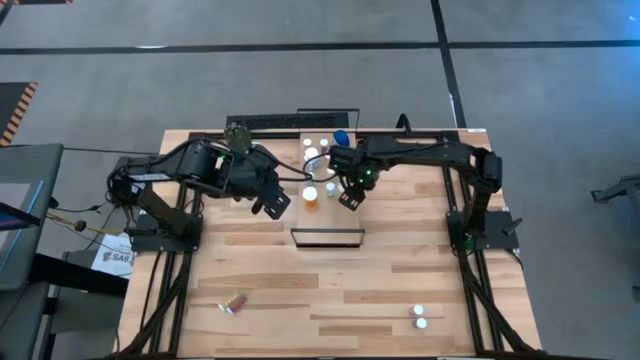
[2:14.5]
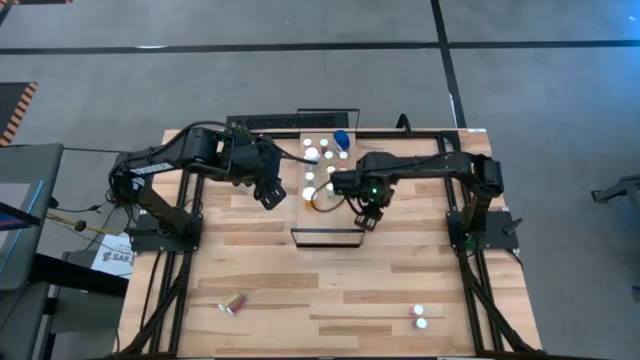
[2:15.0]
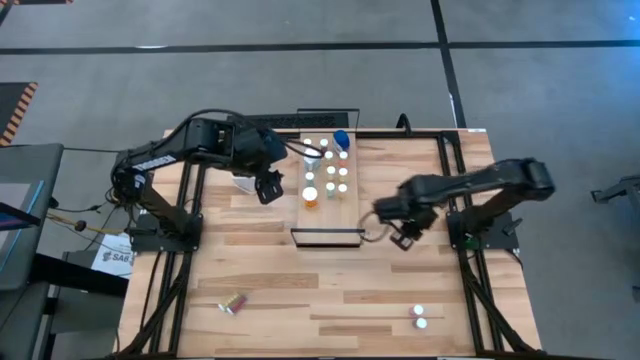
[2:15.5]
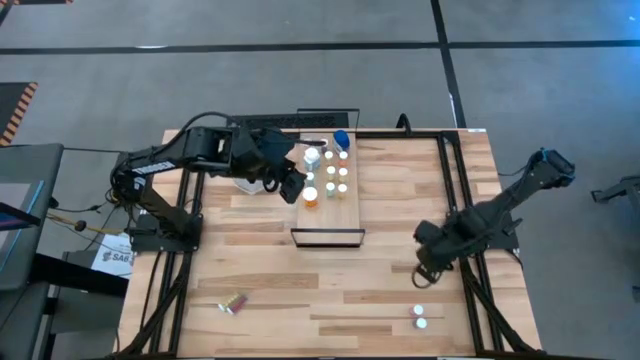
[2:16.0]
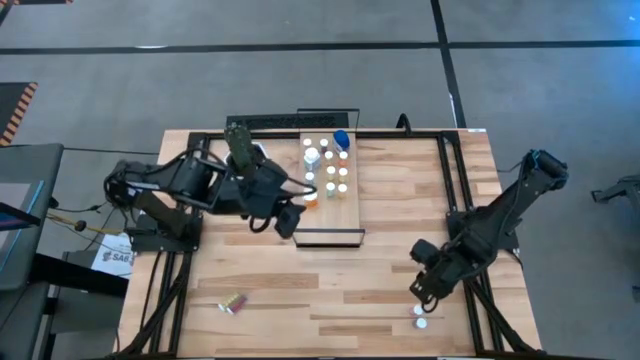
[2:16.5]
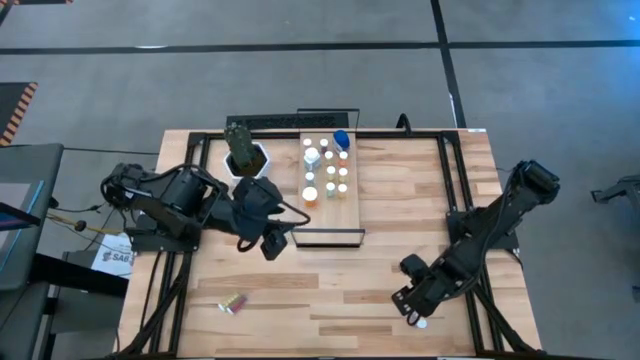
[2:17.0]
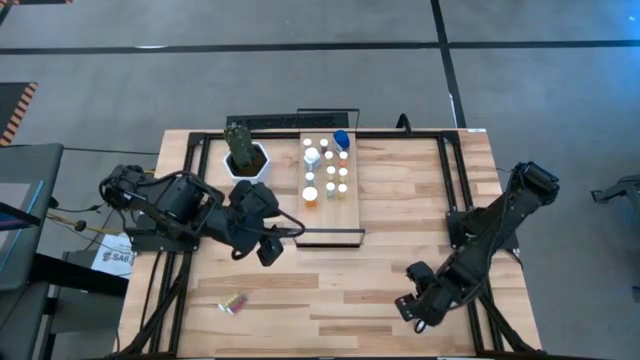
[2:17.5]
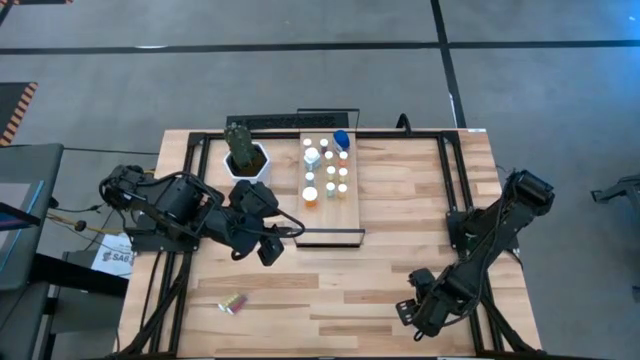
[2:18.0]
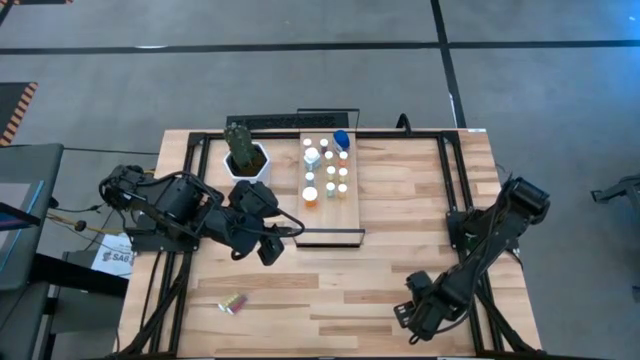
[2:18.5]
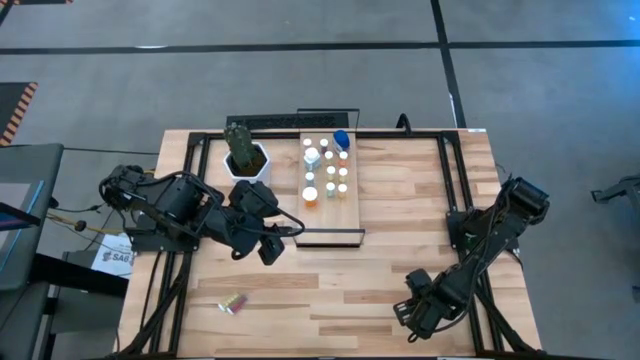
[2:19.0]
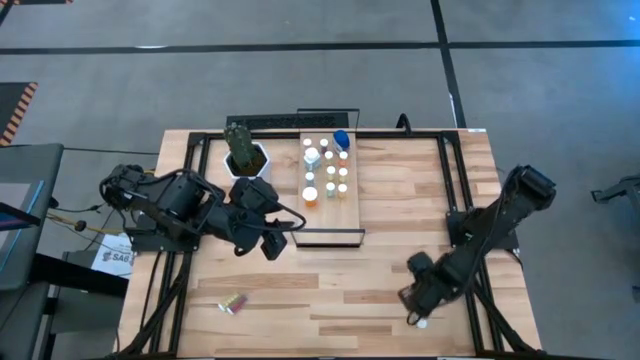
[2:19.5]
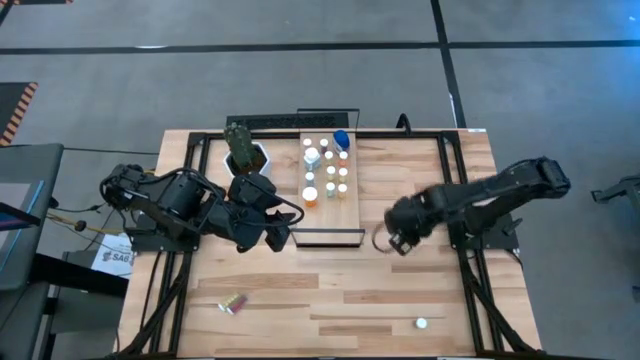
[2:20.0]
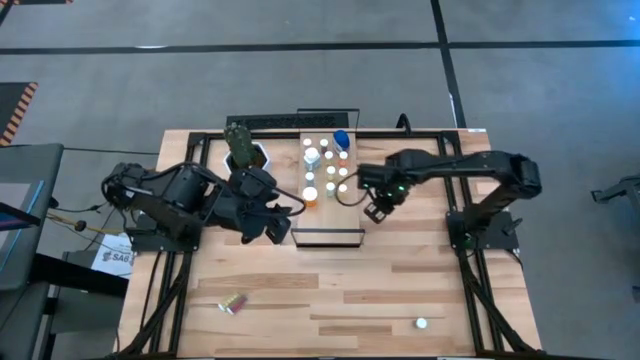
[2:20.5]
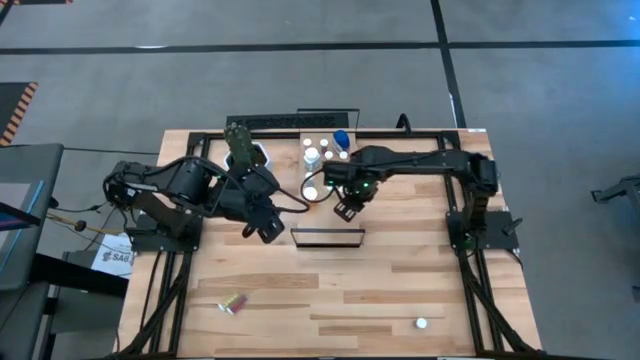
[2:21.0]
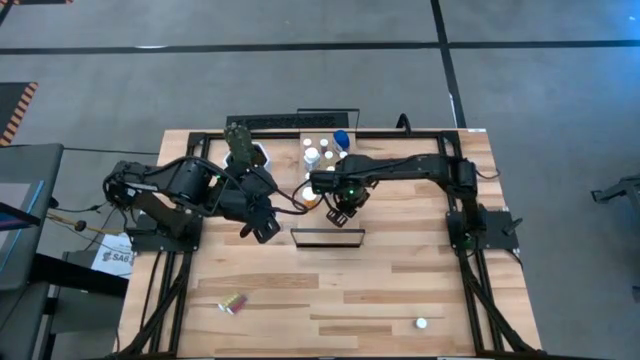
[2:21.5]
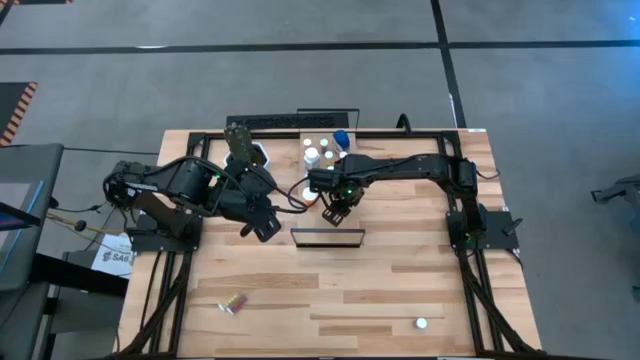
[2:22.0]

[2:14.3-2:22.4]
Task: Pick and place medicine bottles onto shelf by color
Put the pink pill bottle on the shelf

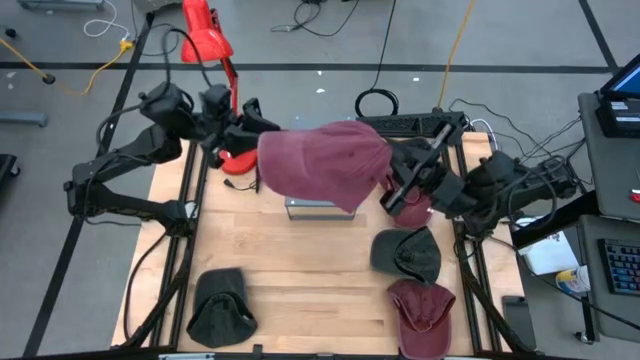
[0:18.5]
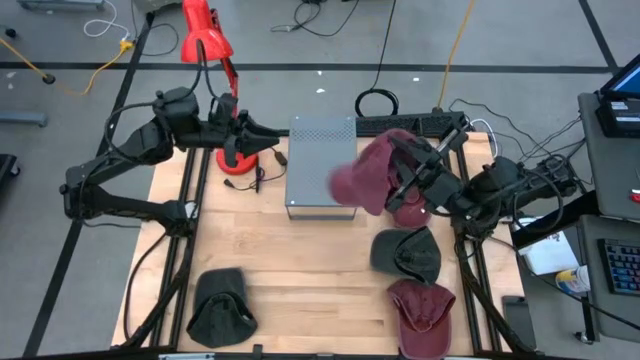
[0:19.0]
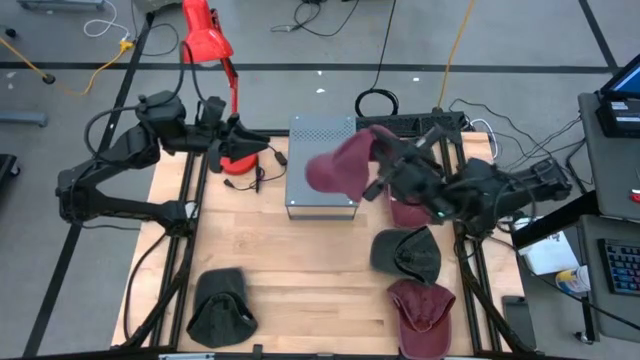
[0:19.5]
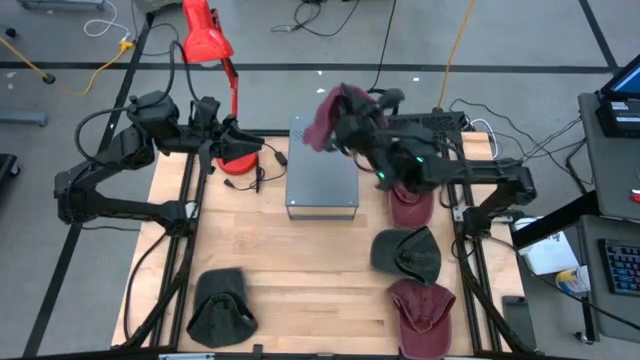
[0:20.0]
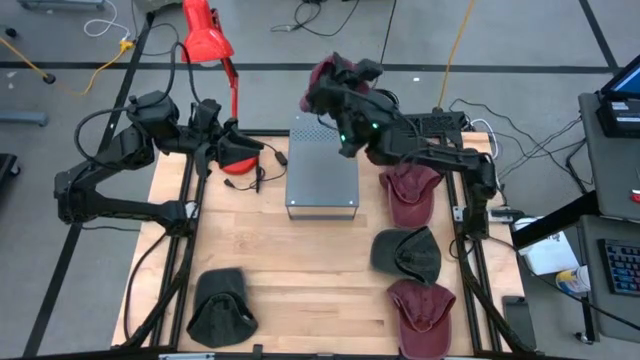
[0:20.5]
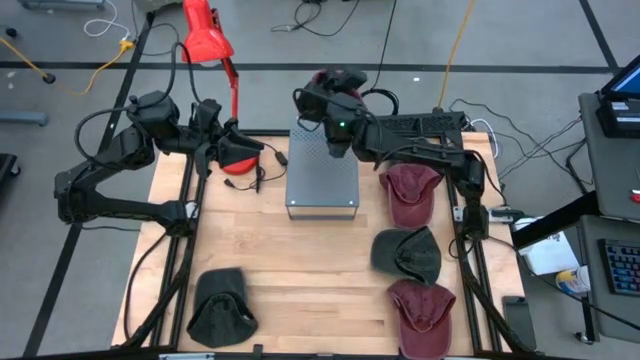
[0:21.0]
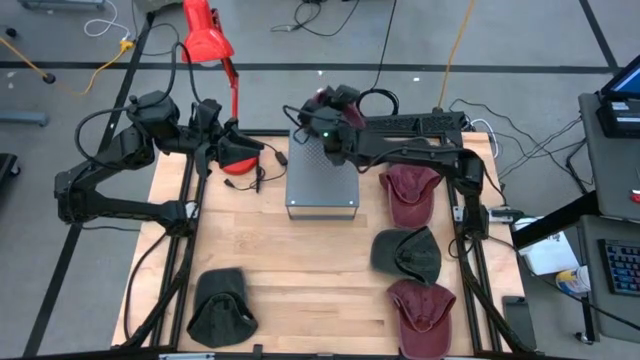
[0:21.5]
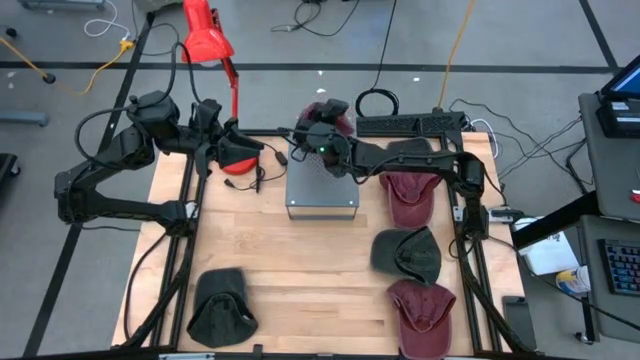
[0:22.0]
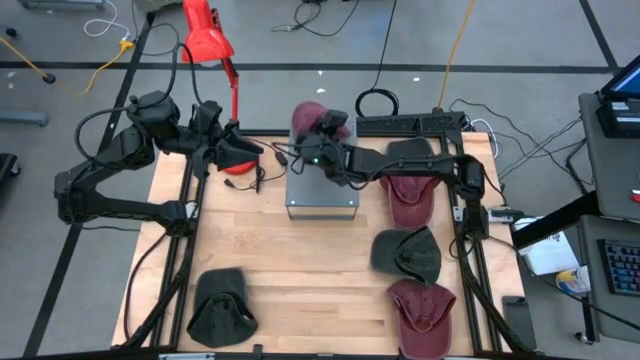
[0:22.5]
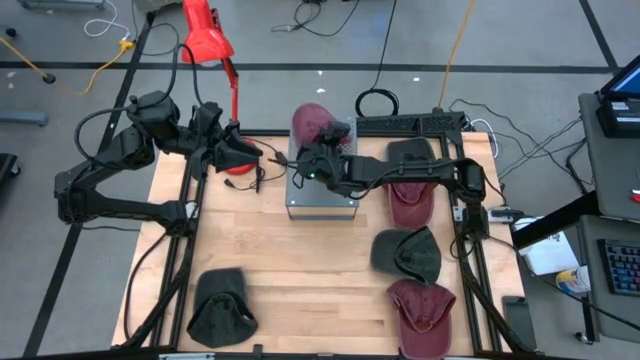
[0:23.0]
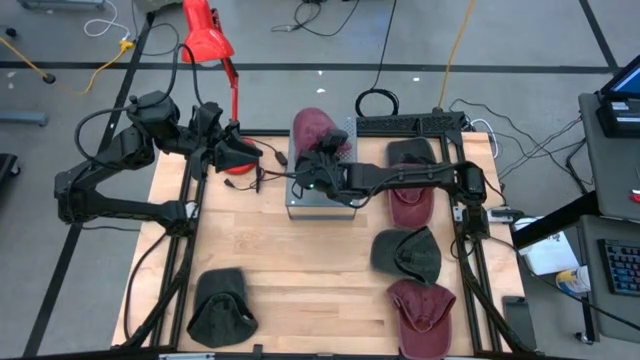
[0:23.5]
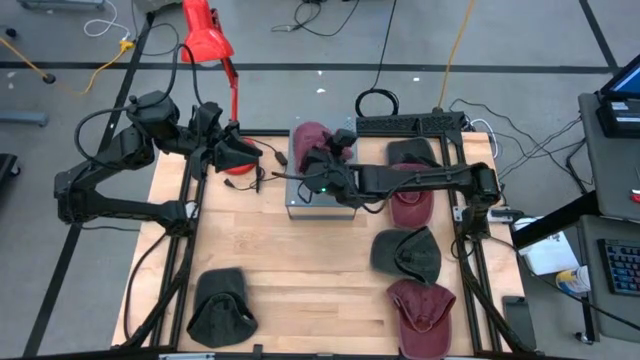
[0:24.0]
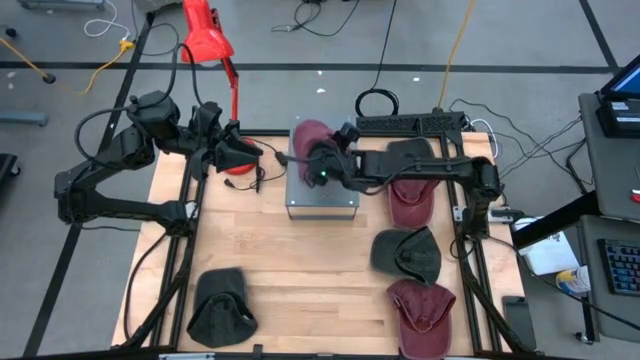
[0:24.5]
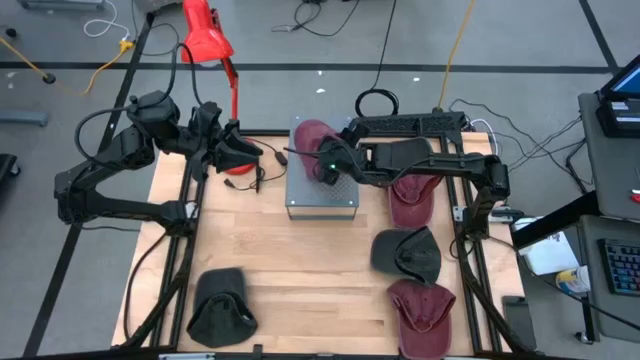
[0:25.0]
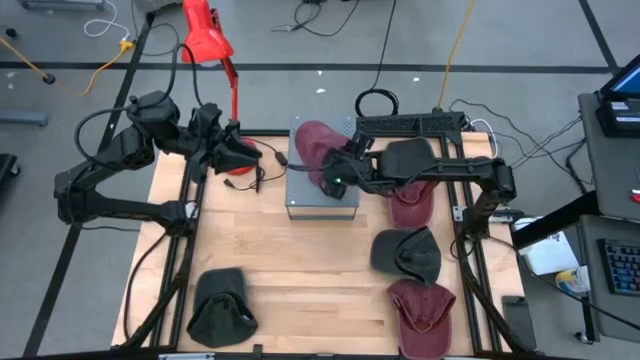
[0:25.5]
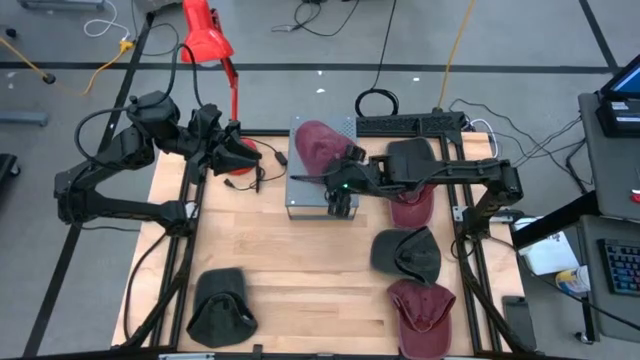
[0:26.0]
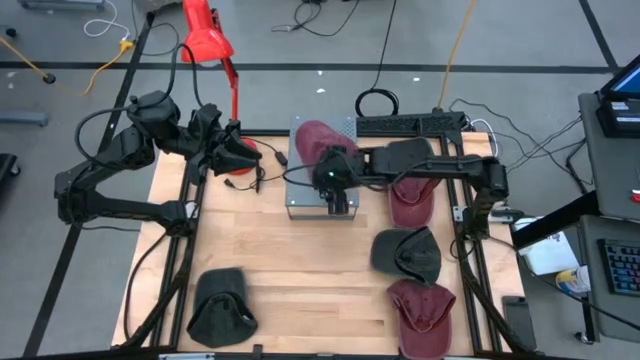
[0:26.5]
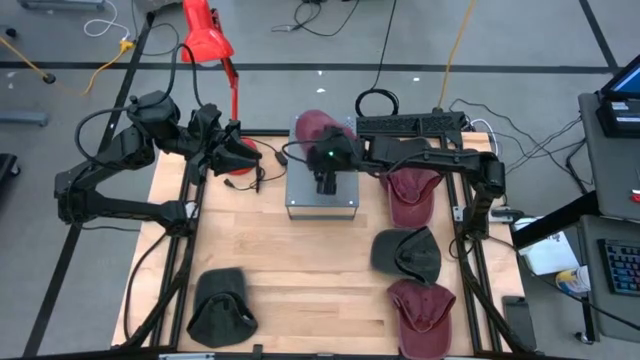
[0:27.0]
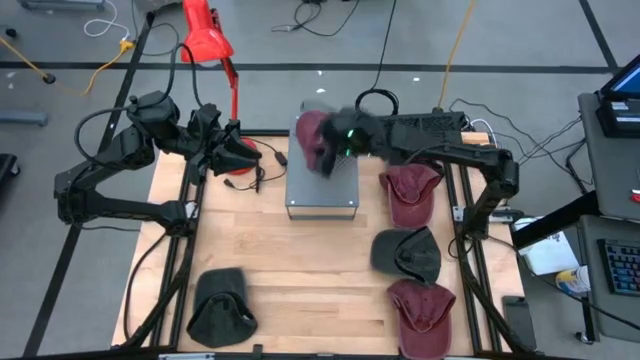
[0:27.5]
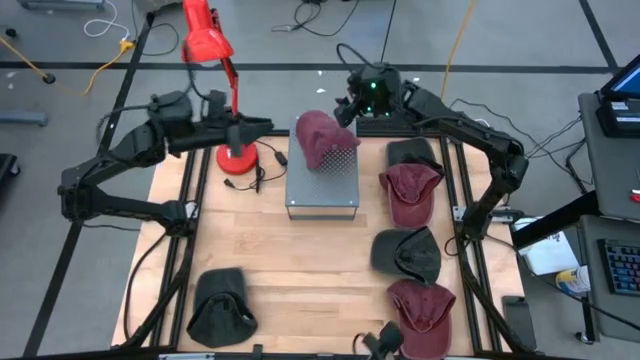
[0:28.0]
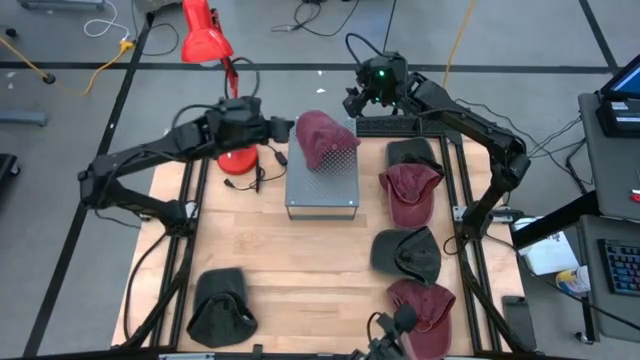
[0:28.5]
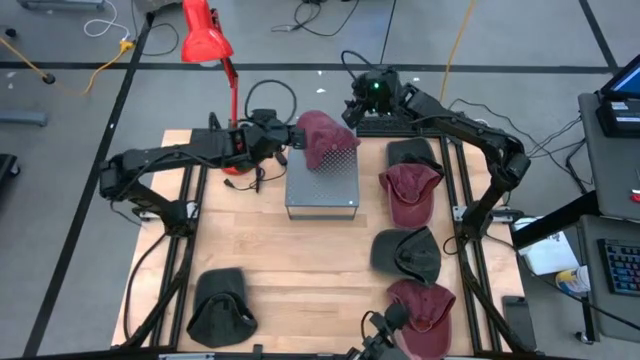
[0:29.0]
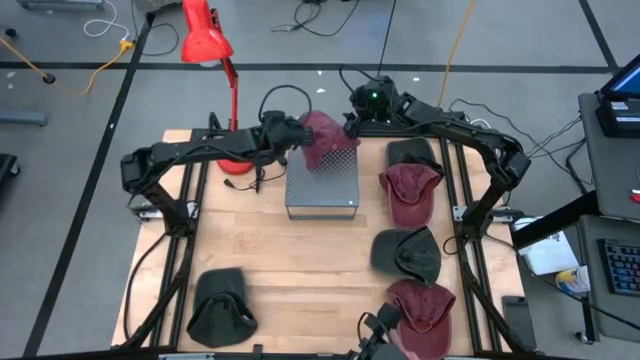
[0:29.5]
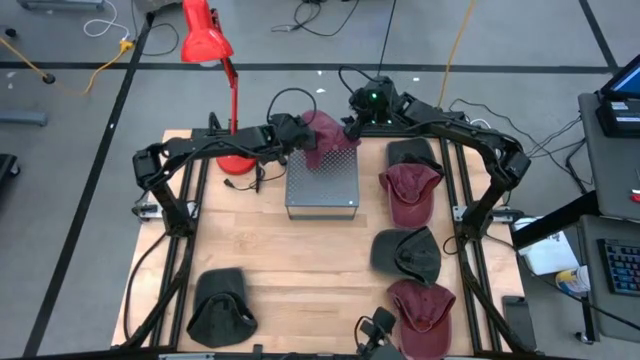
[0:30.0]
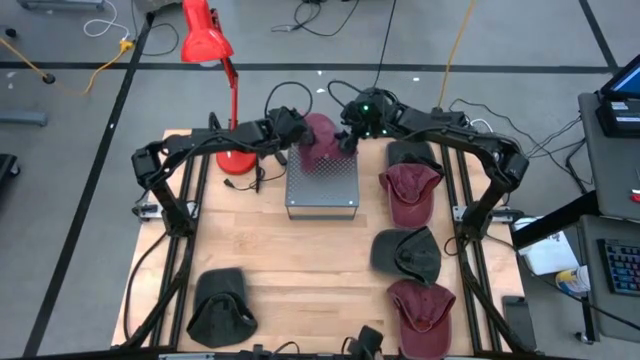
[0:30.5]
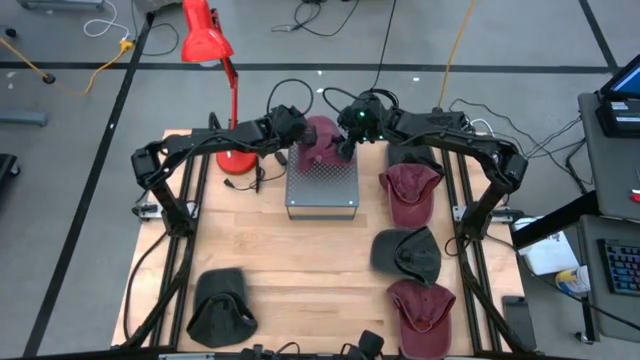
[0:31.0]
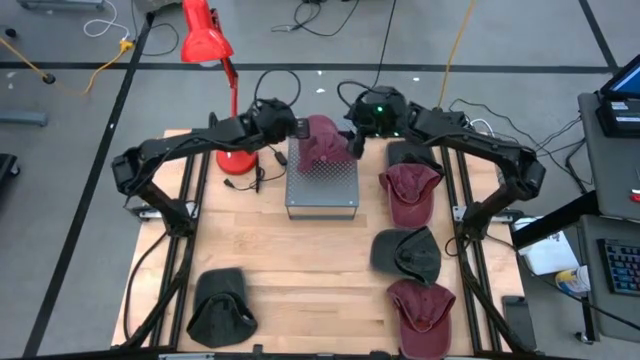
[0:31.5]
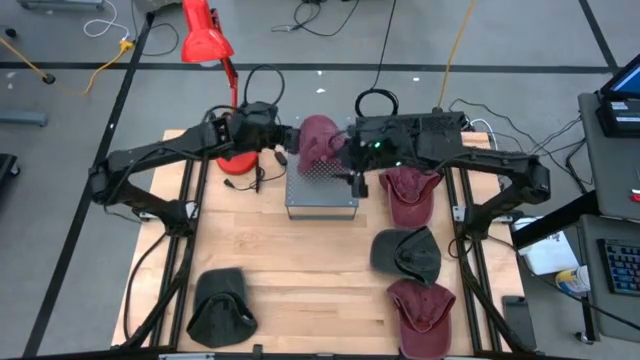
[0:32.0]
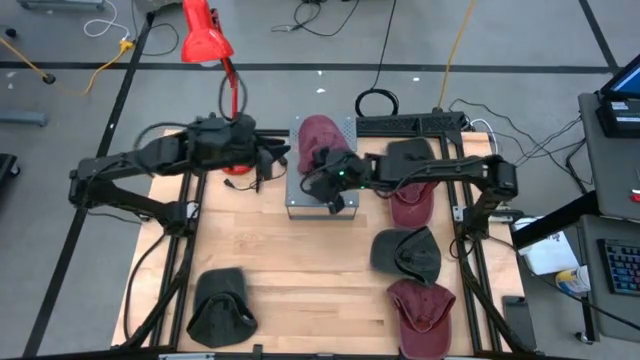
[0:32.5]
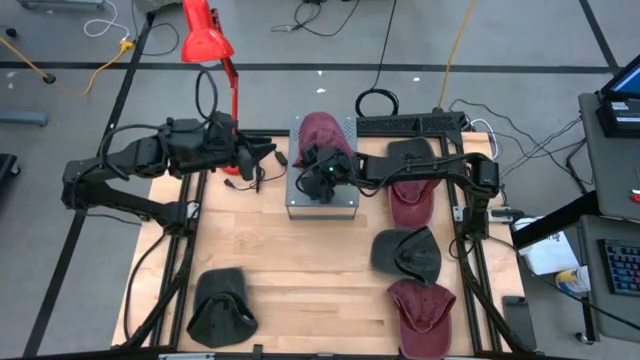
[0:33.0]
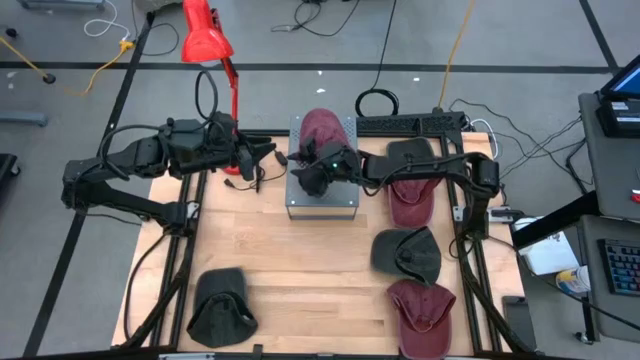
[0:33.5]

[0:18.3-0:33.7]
Task: Pick & Place hat
Put the left red cap on the shelf
